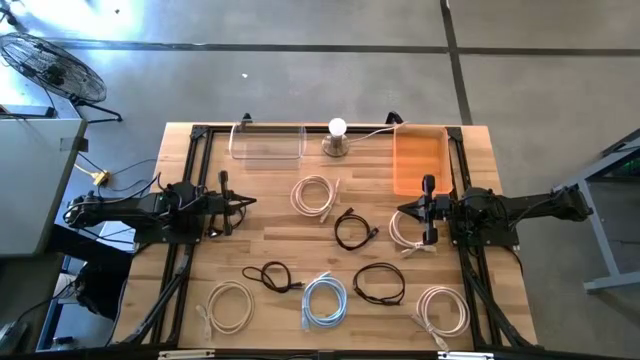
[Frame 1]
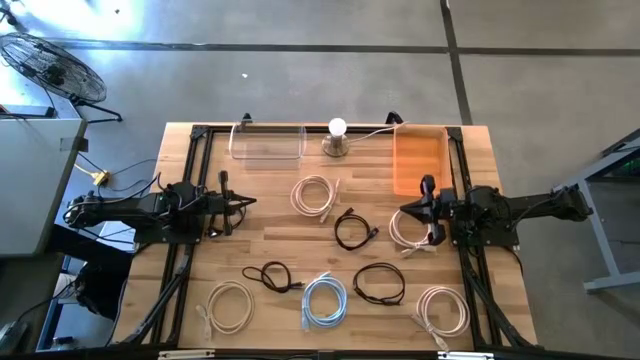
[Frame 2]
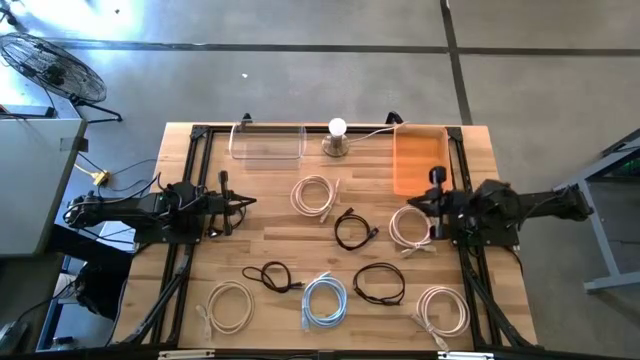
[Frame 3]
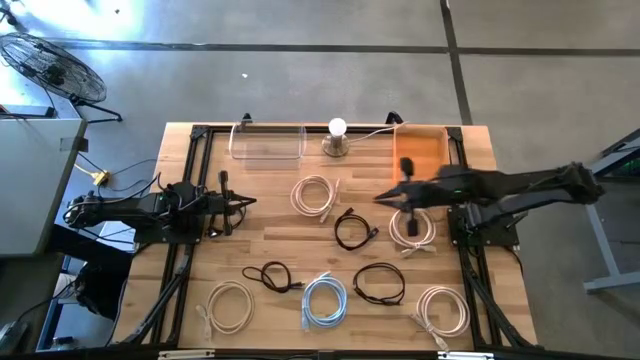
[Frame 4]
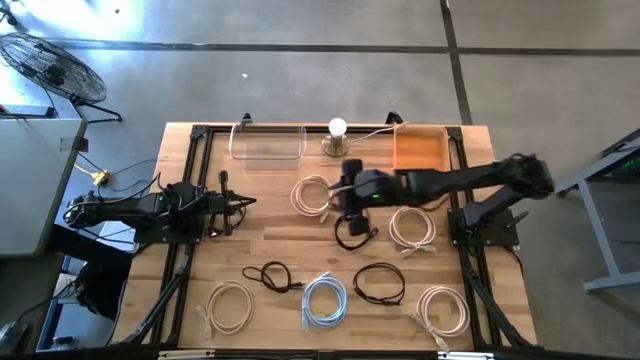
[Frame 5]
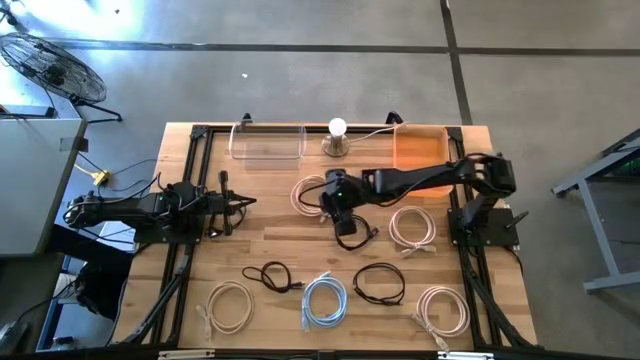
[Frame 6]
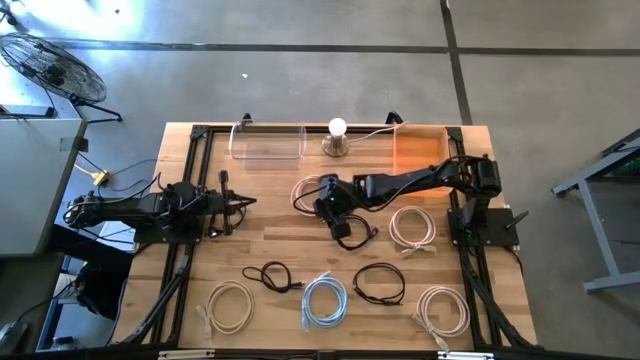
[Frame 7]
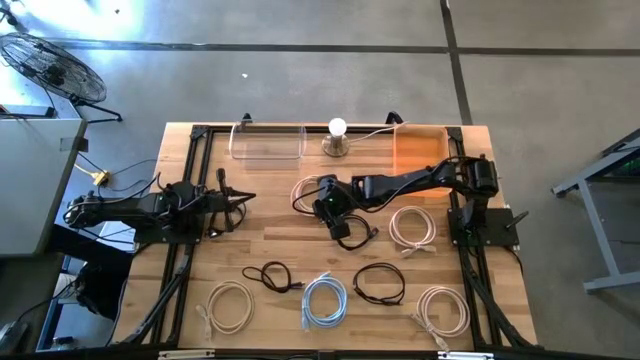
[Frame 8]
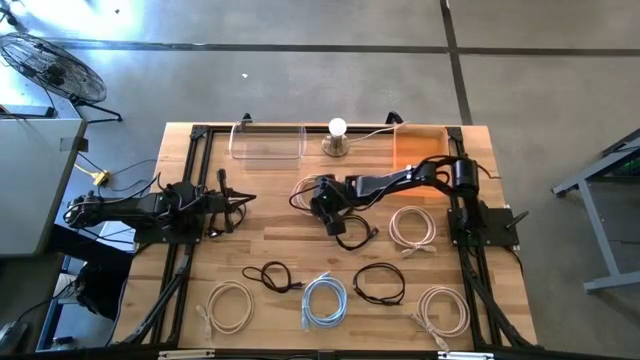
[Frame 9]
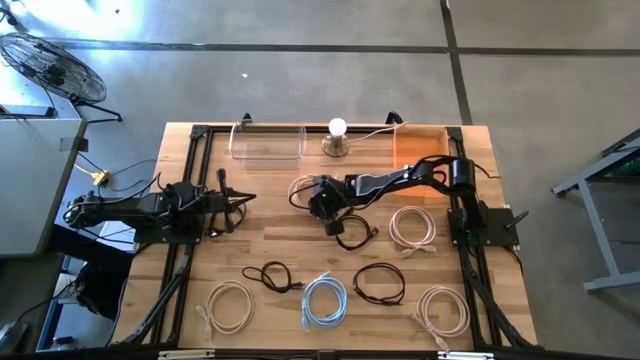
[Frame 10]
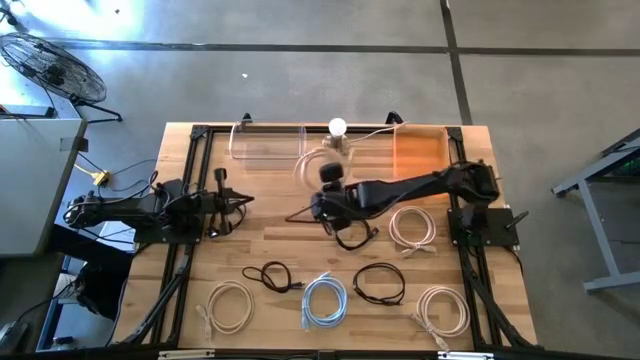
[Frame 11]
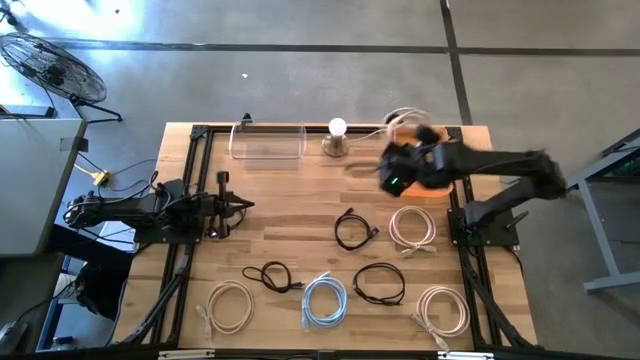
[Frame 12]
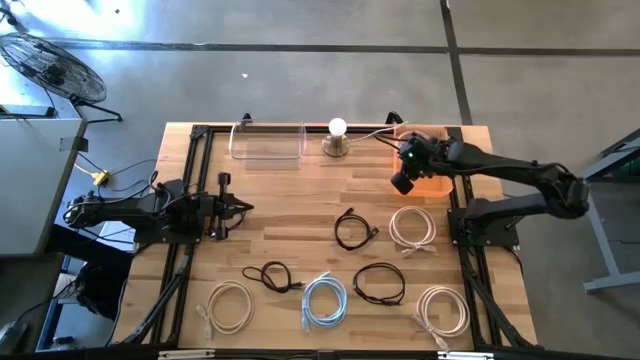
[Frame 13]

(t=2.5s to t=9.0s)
Task: Pick & Place USB Port
Put the white HDMI cable into the orange bin

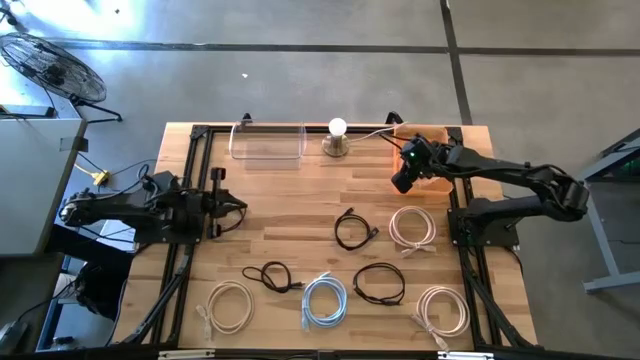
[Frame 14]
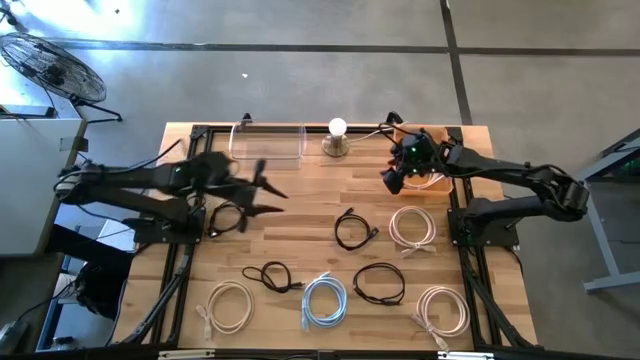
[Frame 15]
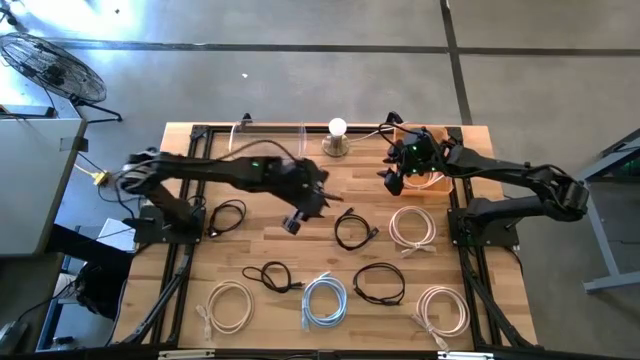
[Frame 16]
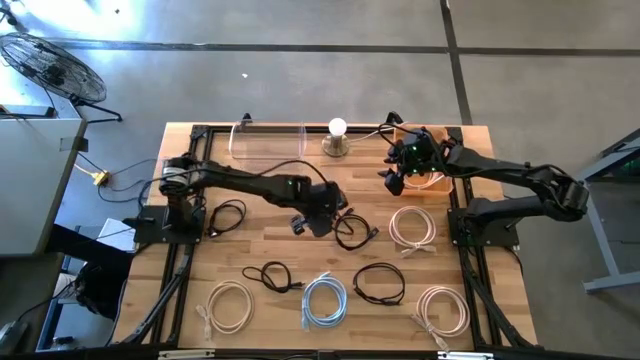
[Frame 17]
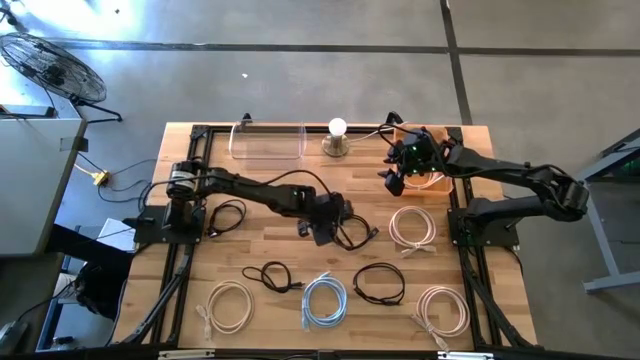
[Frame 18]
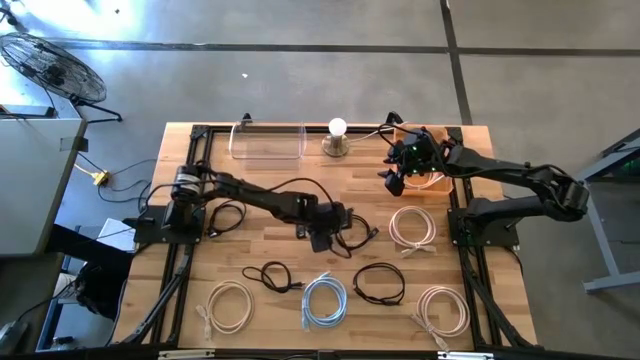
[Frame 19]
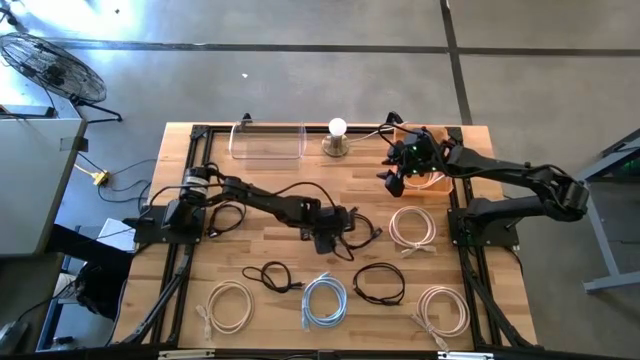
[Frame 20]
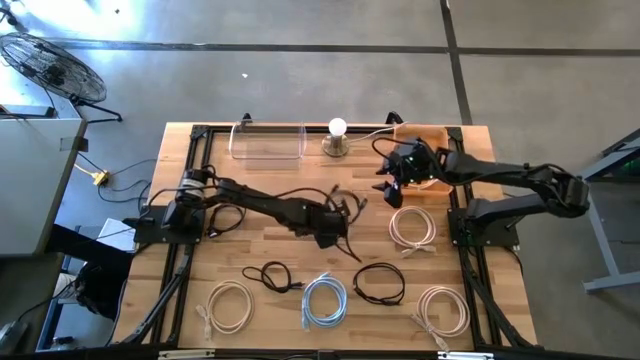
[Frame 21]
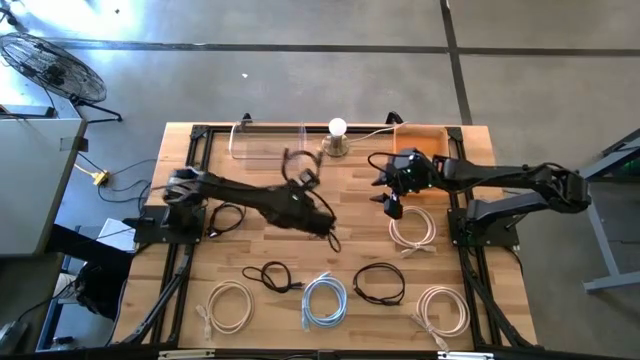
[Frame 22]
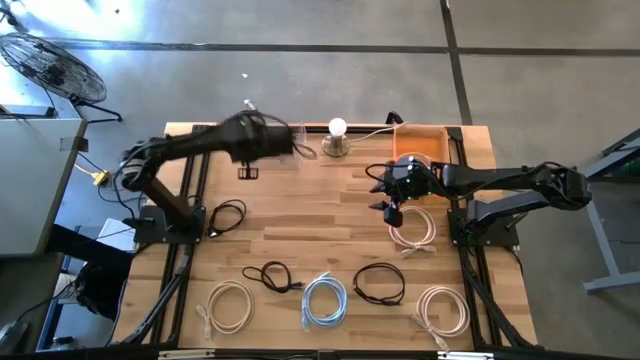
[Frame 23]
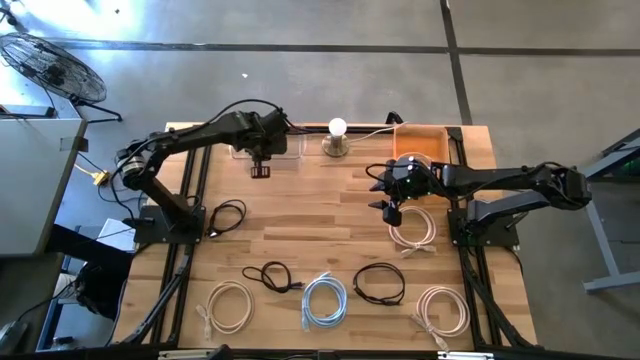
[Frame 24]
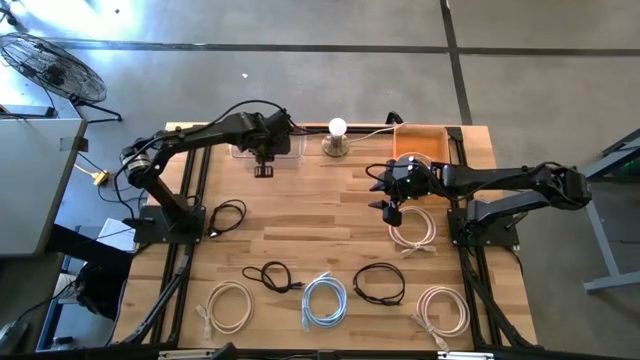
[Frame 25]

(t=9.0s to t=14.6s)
Put the black USB cable into the transparent bin

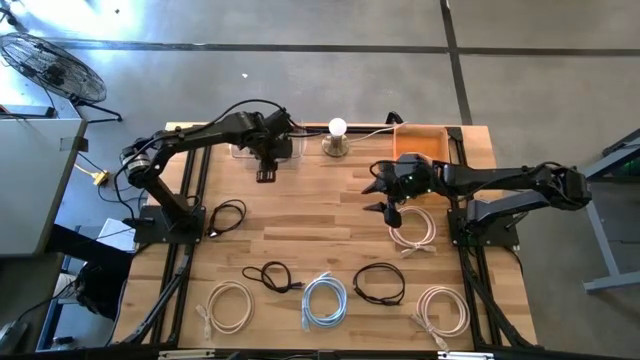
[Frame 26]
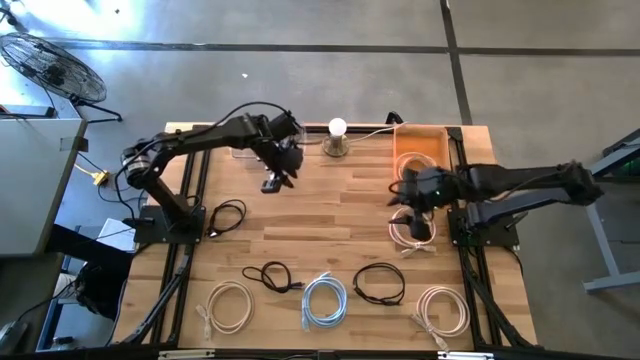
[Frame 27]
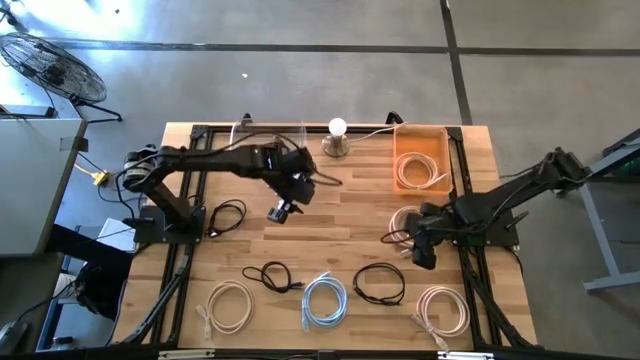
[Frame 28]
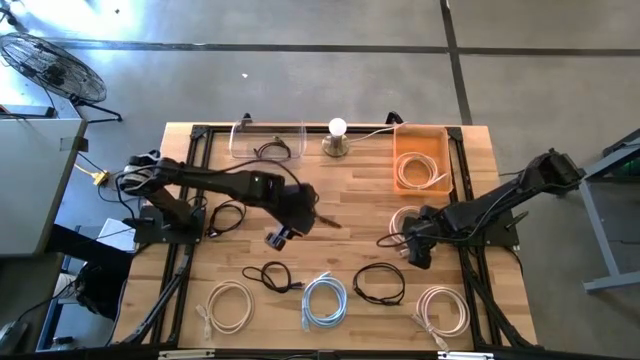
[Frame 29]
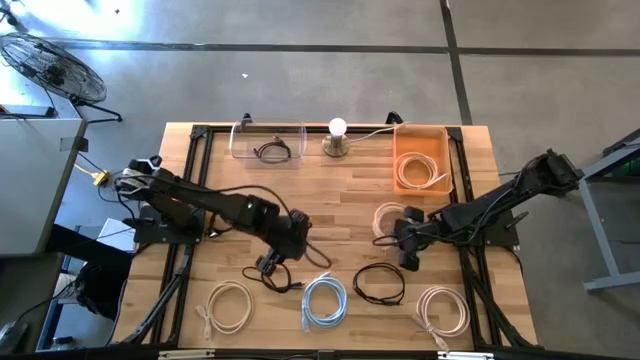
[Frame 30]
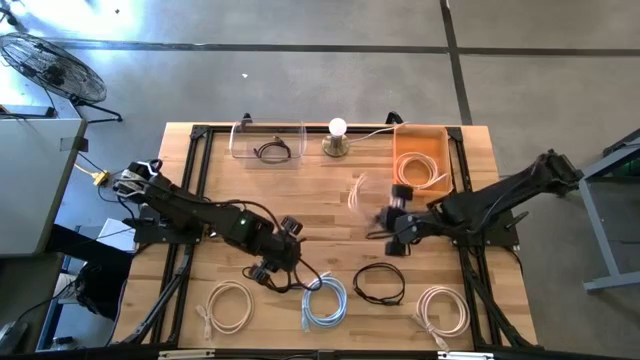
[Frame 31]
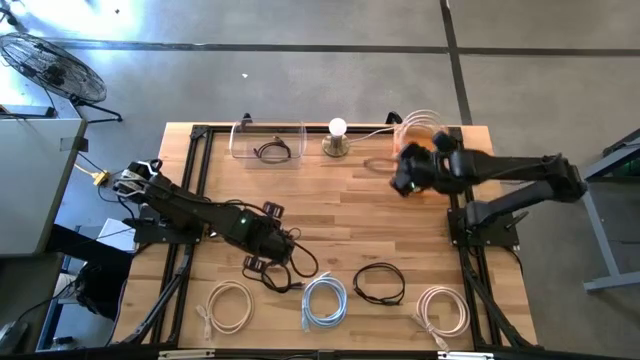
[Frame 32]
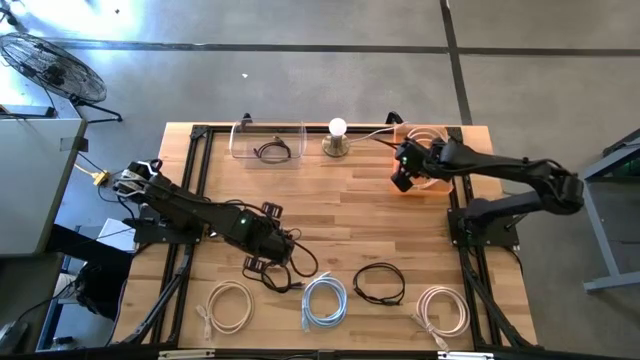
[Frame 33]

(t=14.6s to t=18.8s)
Put the white HDMI cable into the orange bin

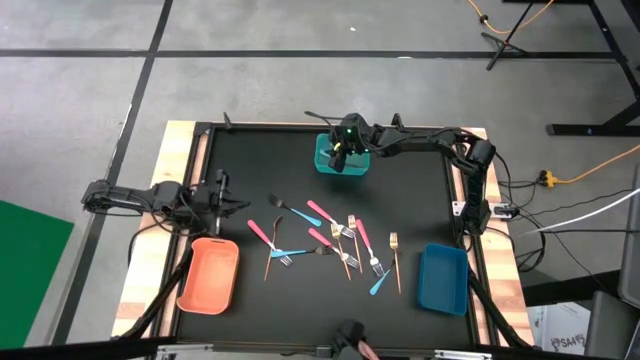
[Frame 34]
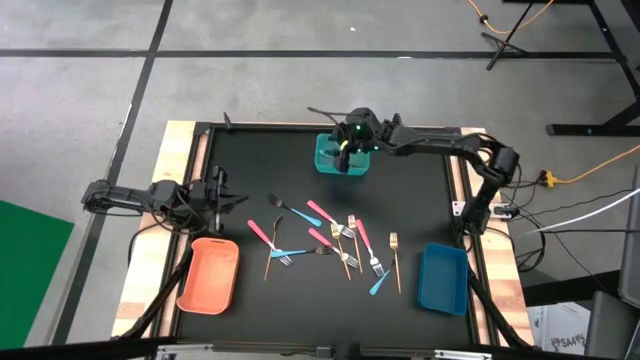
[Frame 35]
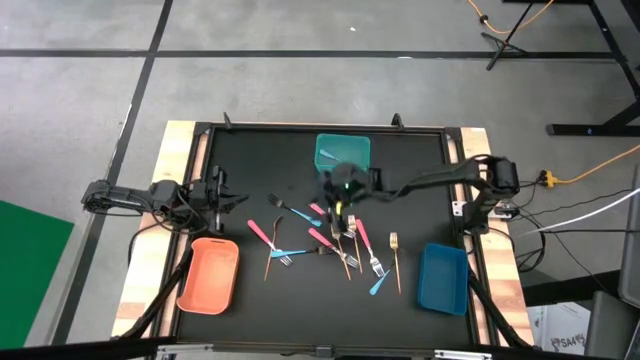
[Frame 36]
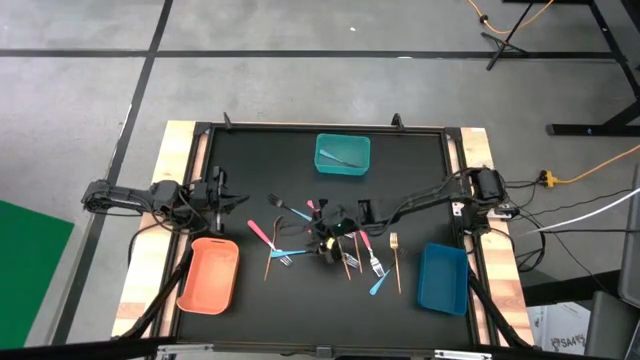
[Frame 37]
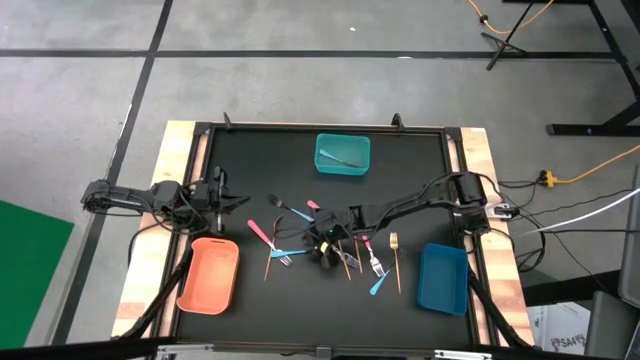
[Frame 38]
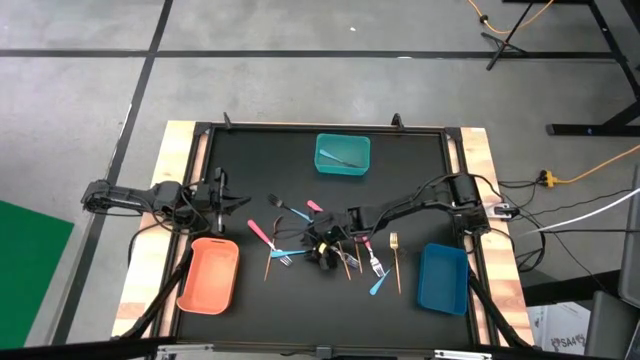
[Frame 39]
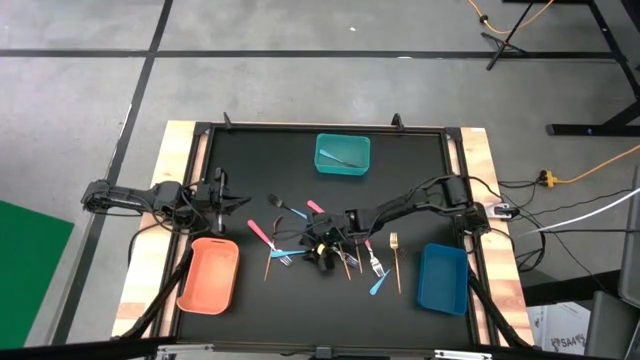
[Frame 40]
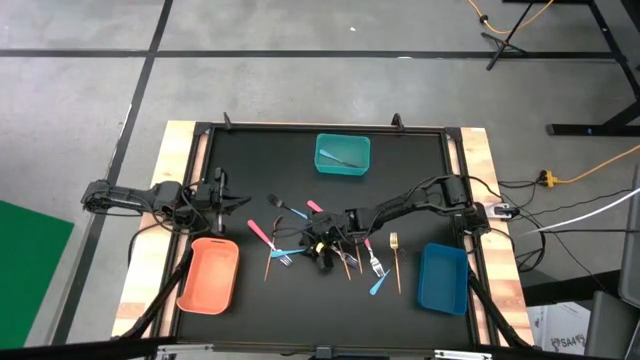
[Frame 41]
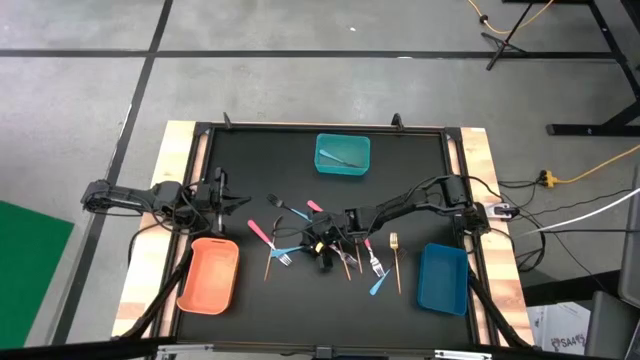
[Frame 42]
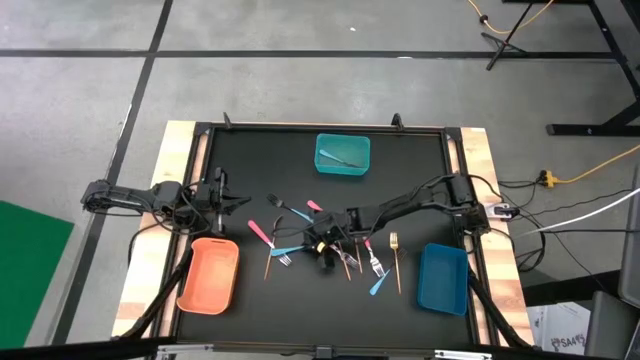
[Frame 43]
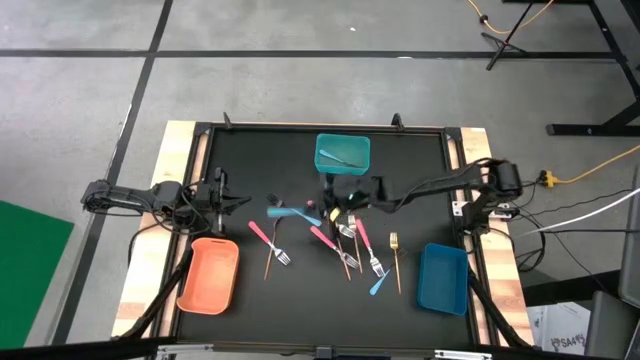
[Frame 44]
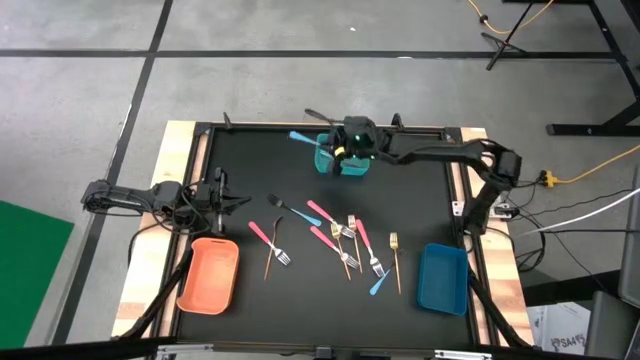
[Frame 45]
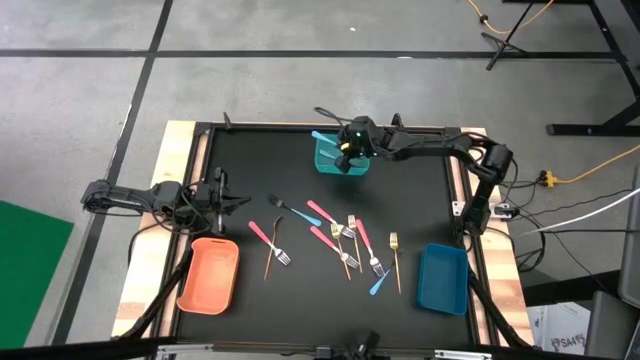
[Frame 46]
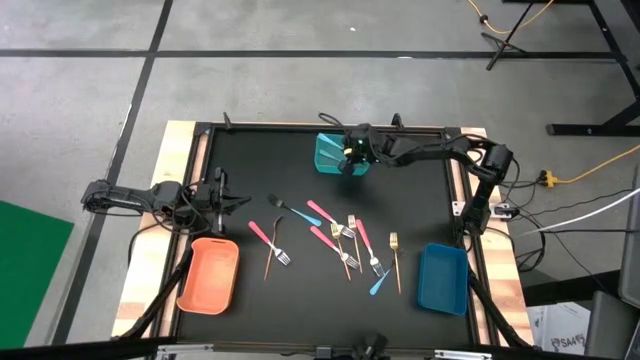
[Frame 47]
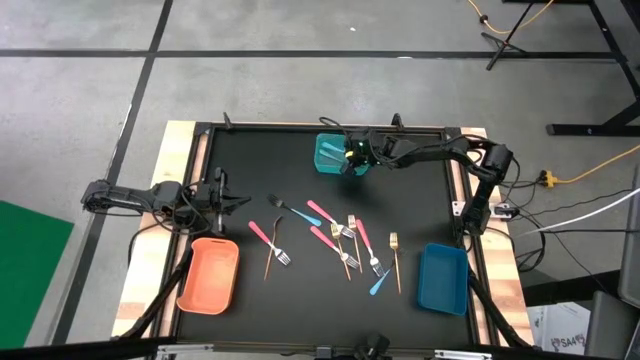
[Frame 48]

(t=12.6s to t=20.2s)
Task: Sort silverware by color (type)
Put the blue fork into the green bin
